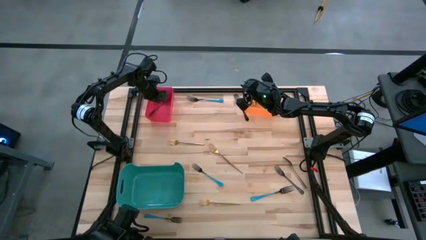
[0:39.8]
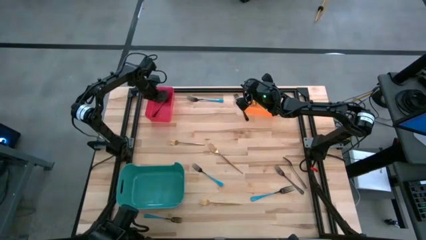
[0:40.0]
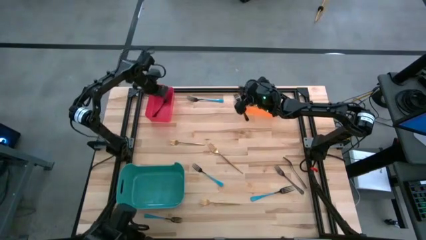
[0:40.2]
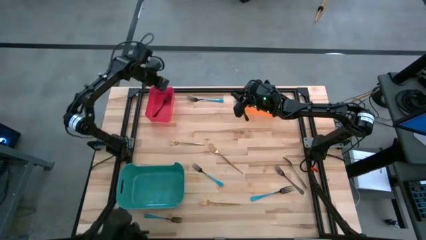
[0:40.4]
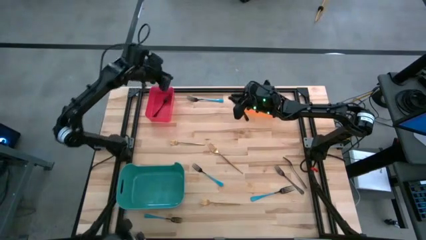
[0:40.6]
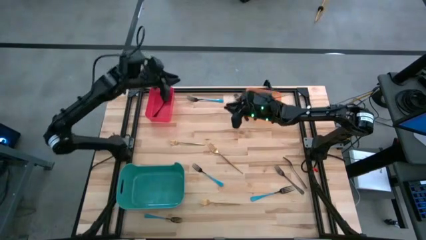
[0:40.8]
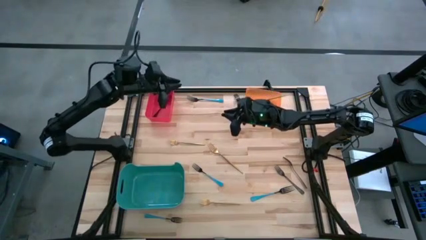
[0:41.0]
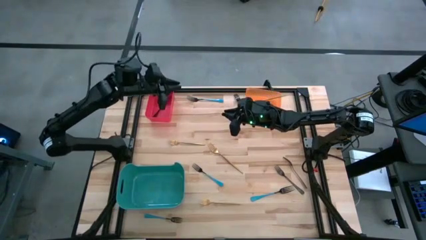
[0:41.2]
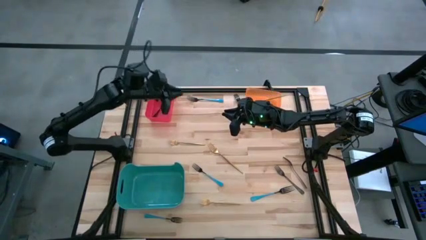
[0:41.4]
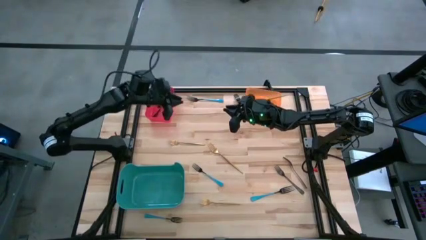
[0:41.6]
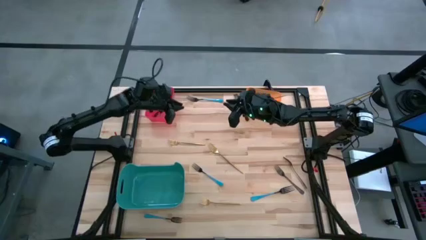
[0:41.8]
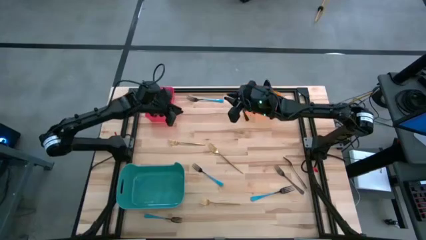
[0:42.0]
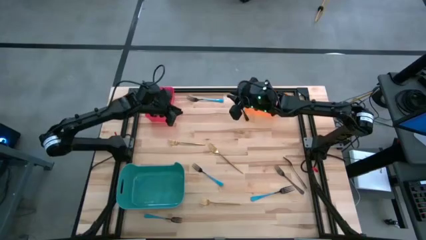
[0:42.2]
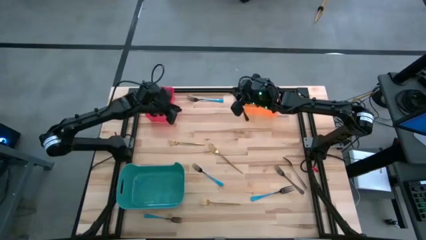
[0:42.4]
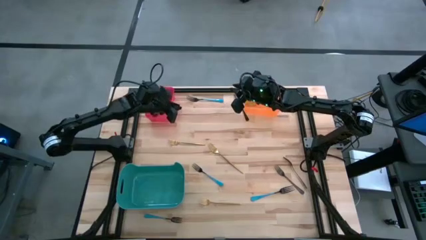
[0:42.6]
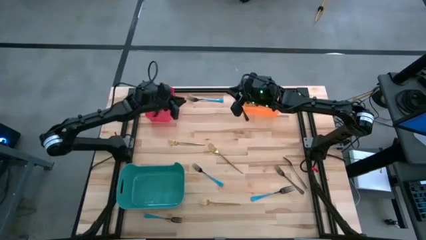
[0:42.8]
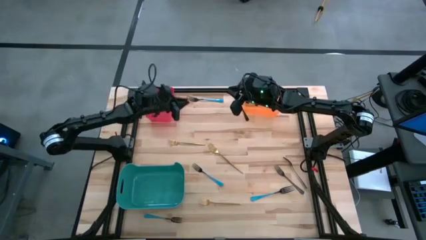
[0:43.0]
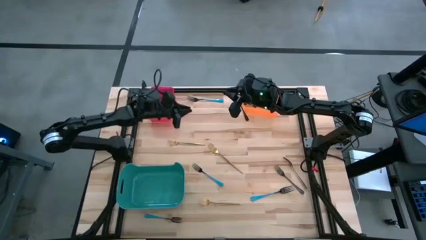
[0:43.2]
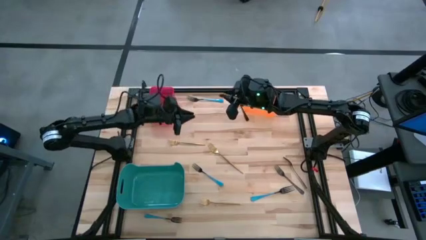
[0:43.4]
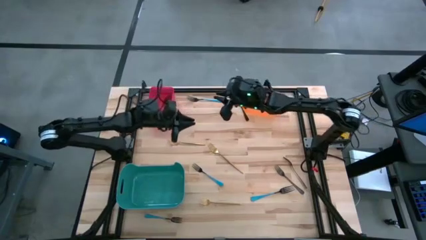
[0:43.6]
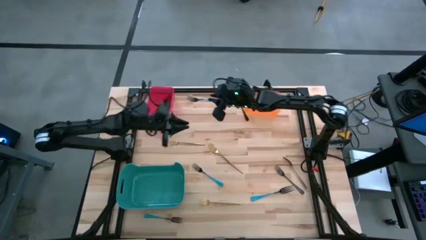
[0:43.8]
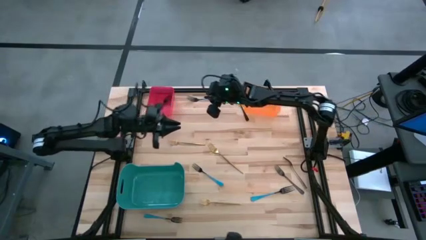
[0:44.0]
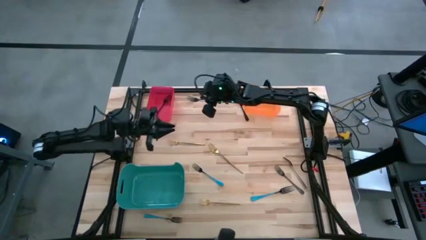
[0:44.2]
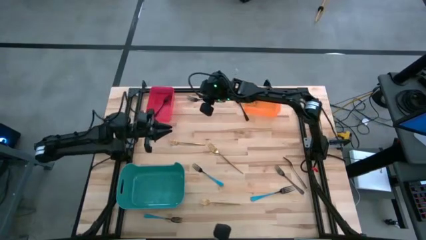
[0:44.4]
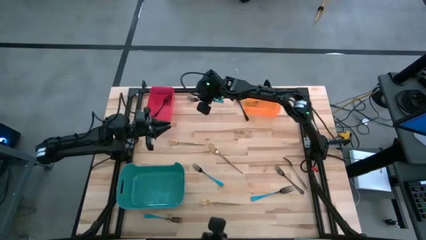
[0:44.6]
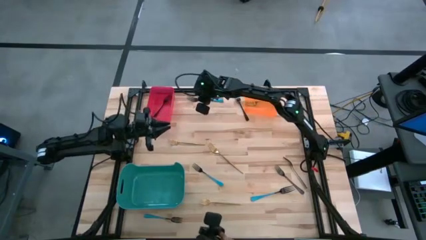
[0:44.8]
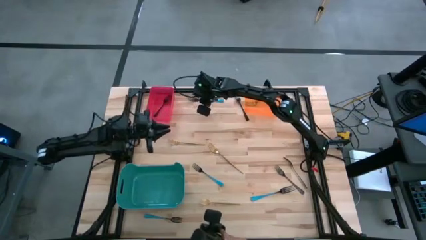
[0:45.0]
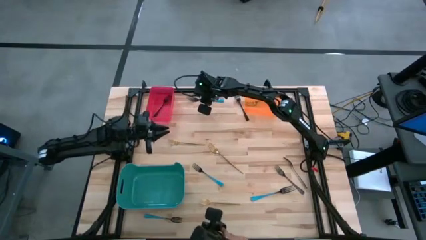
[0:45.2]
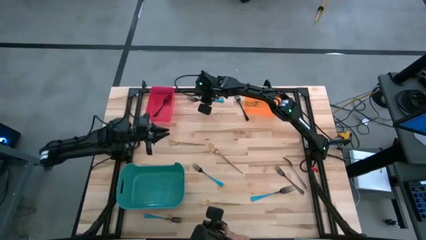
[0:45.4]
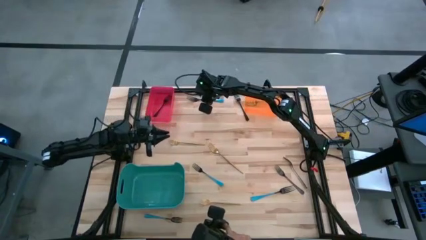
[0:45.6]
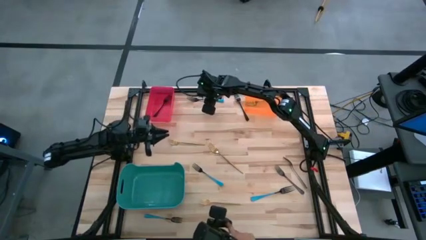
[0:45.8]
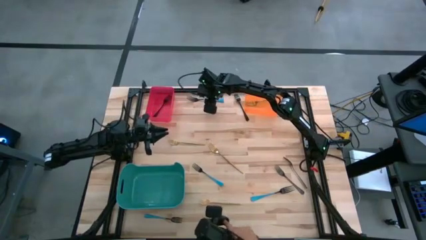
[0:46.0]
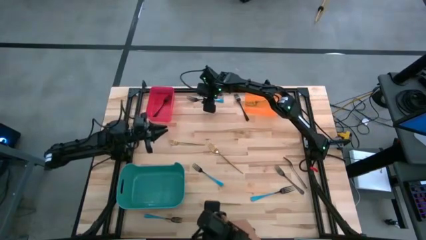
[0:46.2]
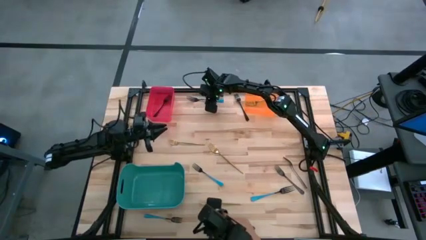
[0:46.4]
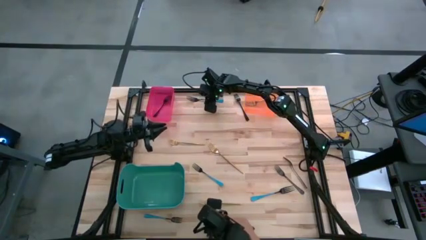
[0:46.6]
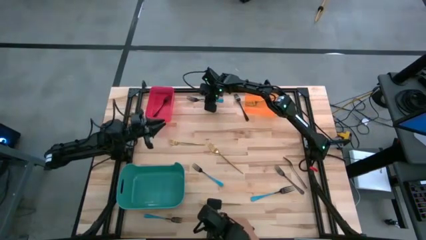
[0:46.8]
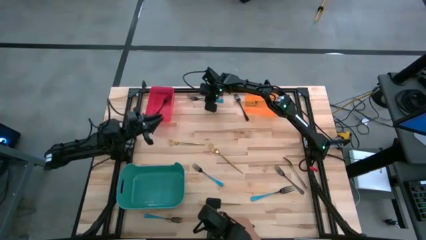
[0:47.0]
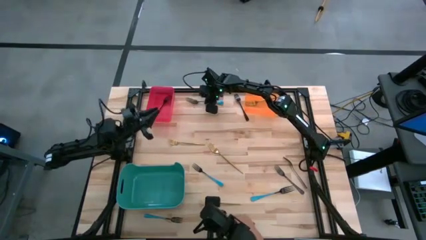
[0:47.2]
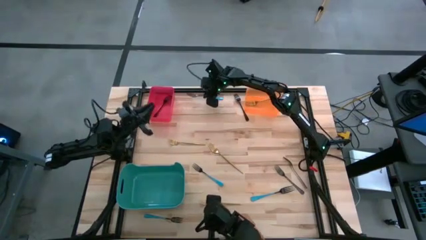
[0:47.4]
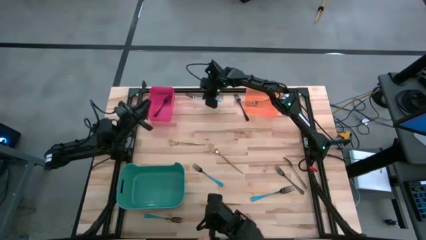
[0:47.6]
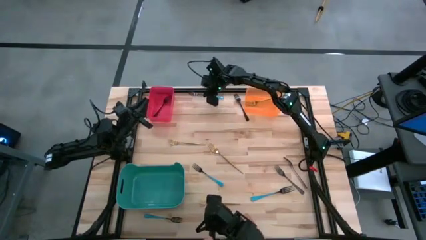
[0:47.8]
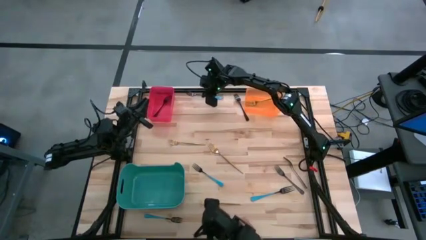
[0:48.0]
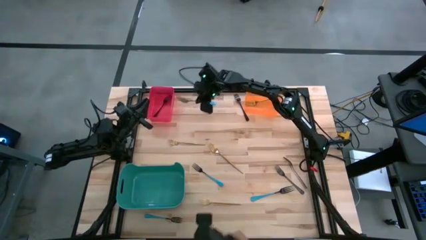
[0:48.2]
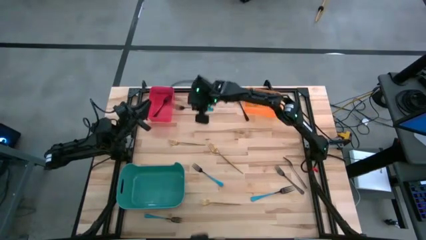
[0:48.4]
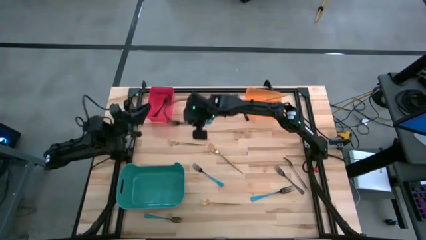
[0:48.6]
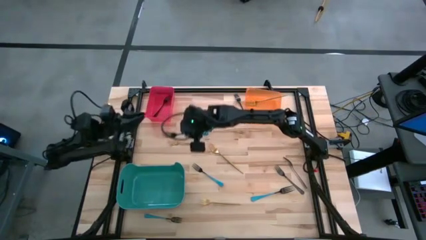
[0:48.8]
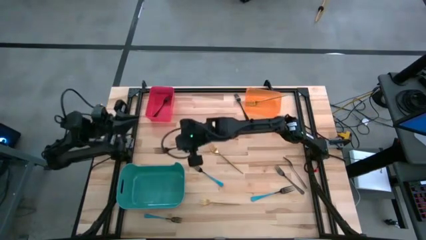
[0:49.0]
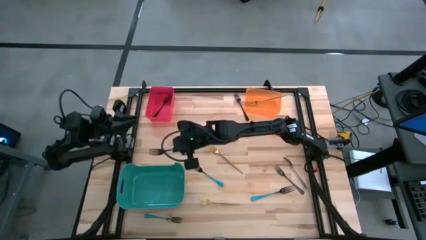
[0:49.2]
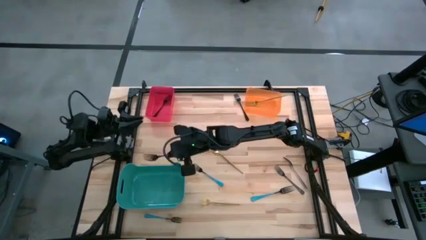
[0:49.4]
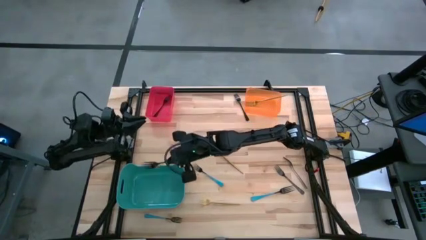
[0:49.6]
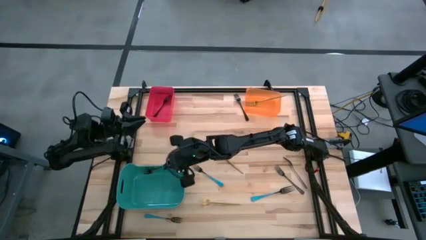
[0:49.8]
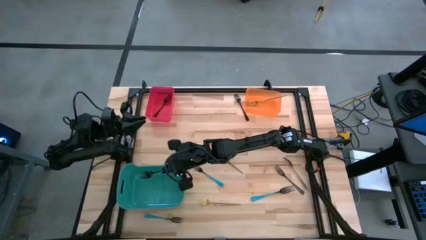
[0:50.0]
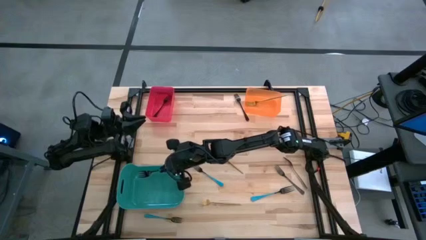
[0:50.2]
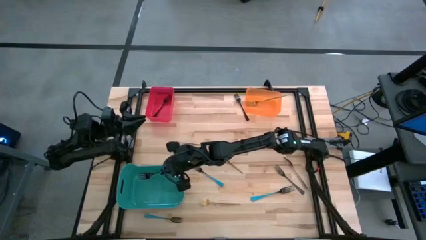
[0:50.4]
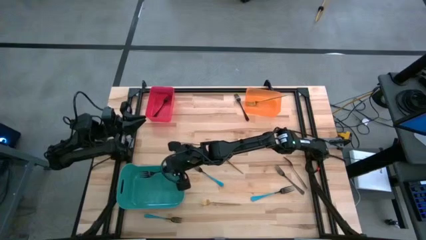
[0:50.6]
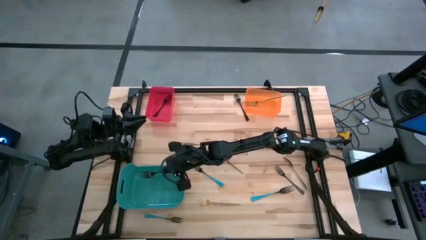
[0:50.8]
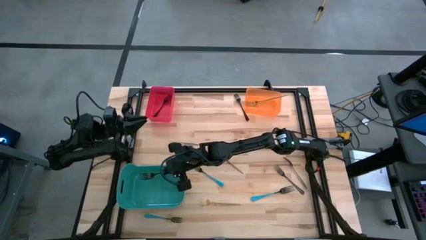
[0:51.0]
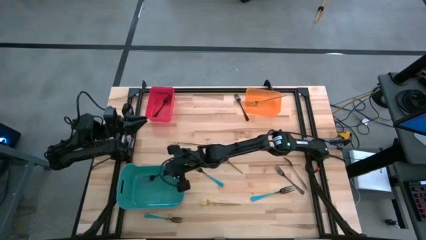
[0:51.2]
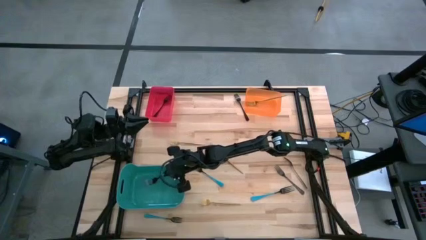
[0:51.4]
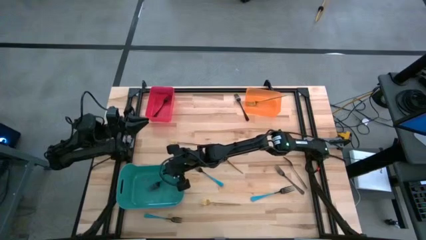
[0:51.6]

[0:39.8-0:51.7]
Task: Sort silverware by color (type)
Put the blue fork into the green bin
